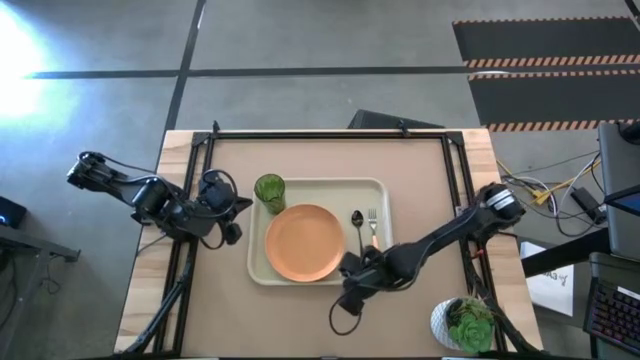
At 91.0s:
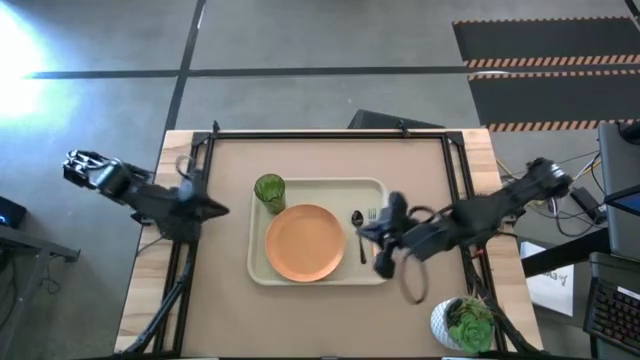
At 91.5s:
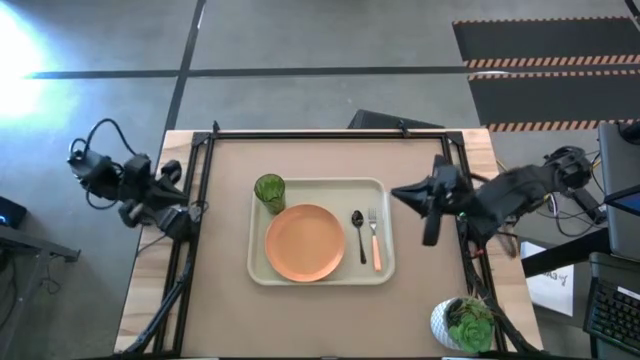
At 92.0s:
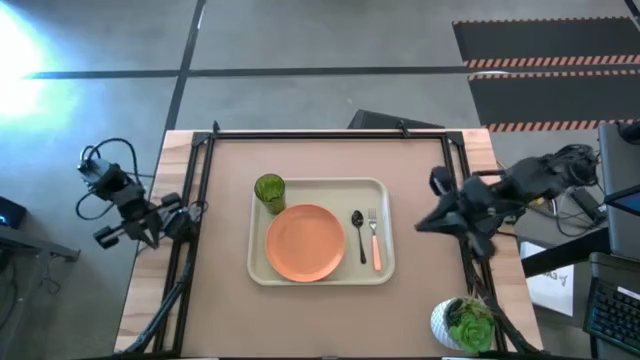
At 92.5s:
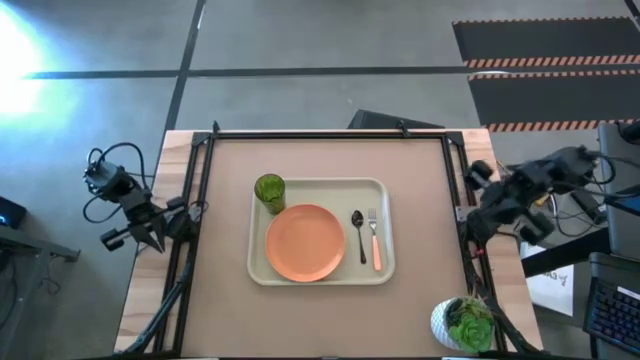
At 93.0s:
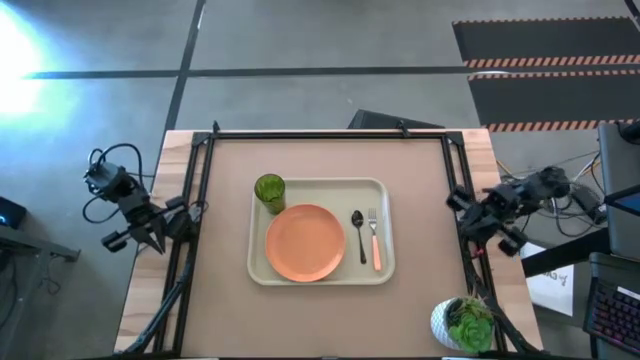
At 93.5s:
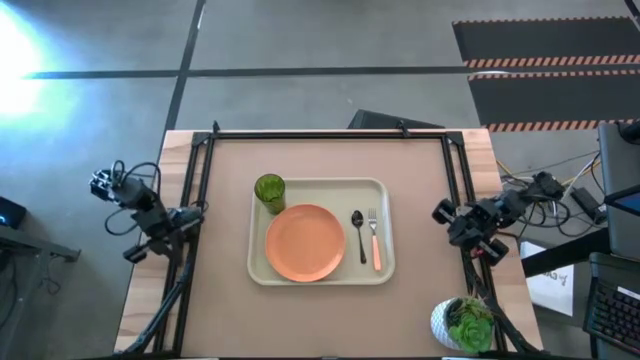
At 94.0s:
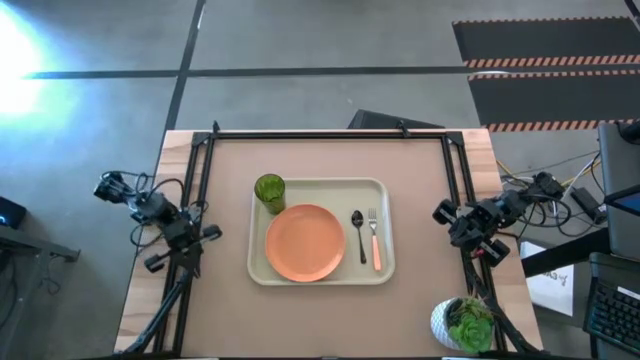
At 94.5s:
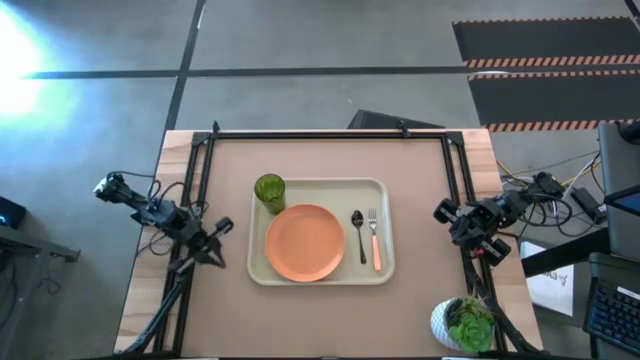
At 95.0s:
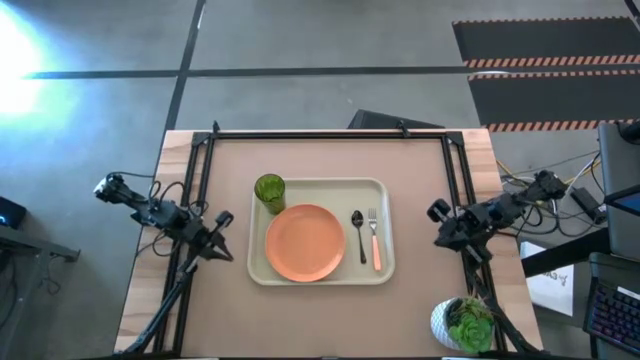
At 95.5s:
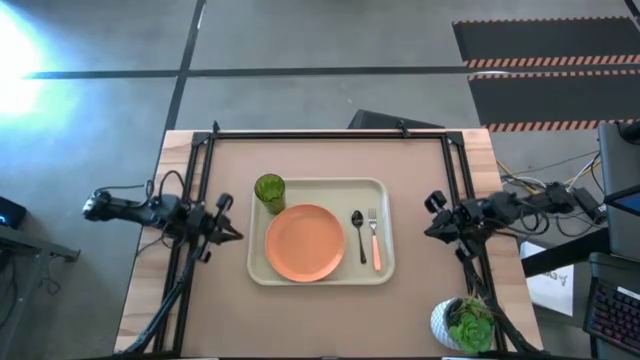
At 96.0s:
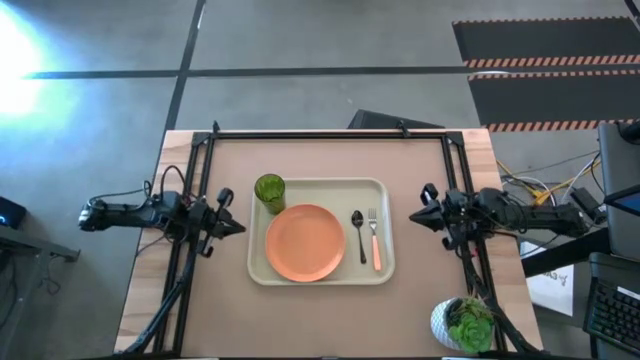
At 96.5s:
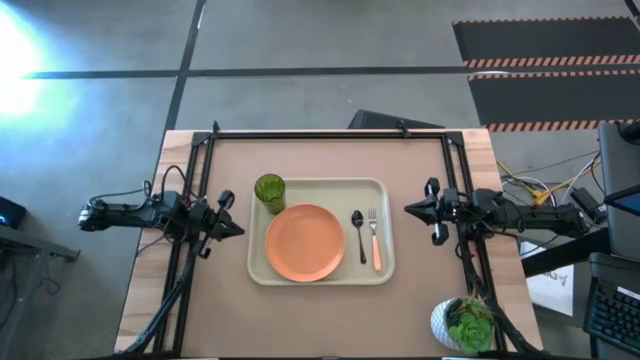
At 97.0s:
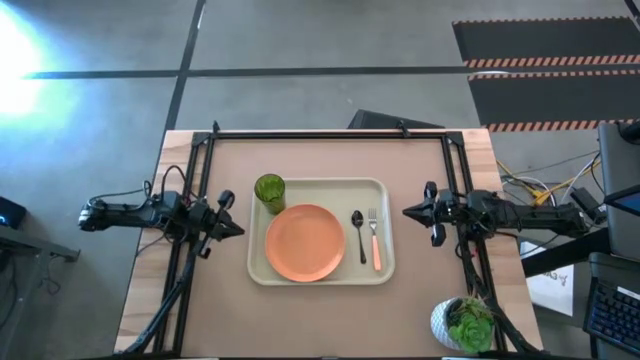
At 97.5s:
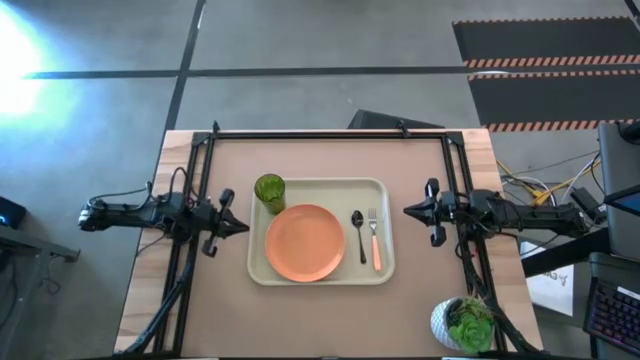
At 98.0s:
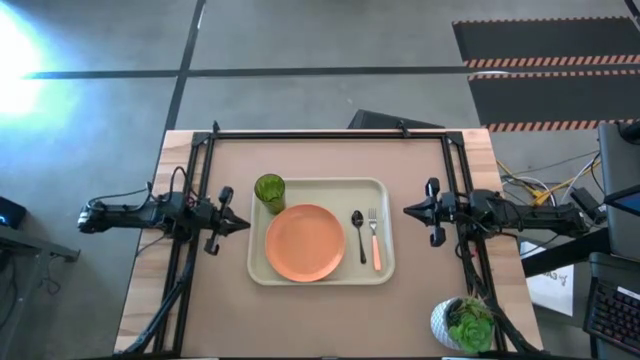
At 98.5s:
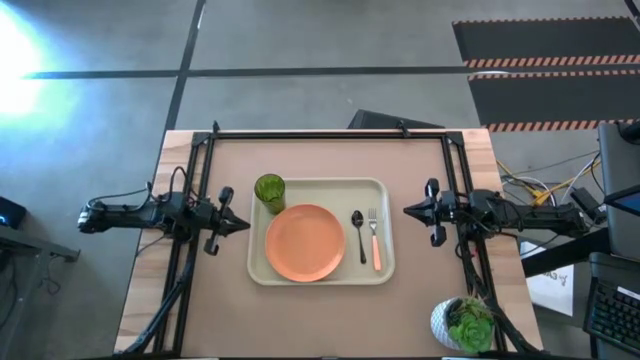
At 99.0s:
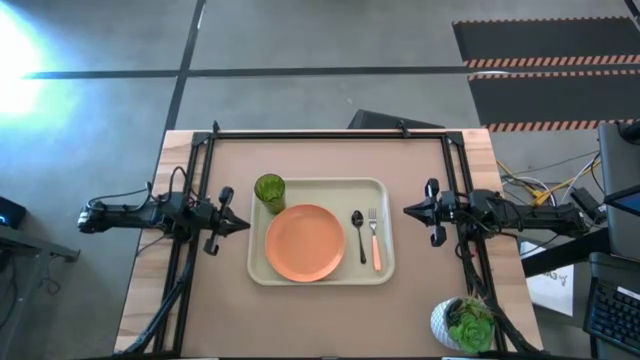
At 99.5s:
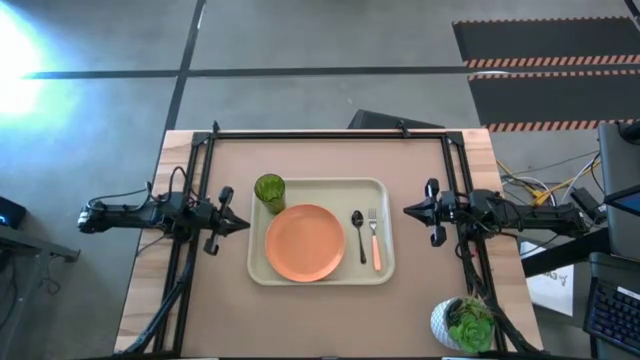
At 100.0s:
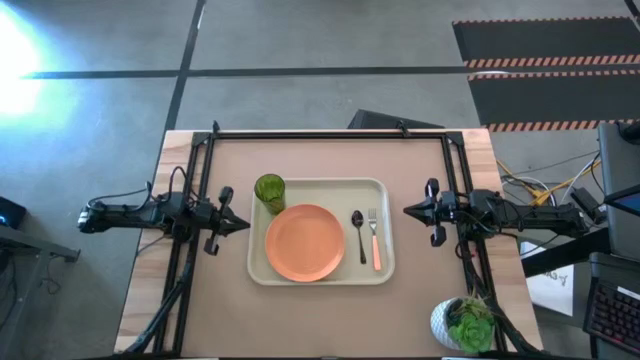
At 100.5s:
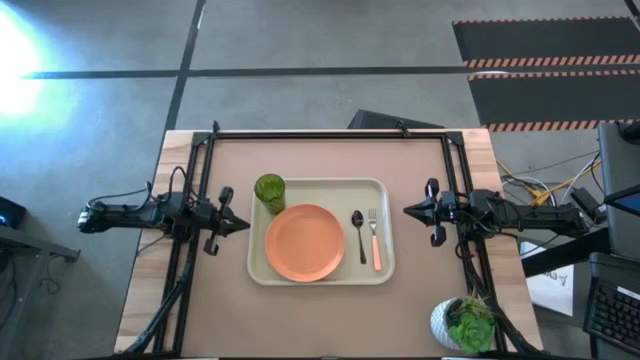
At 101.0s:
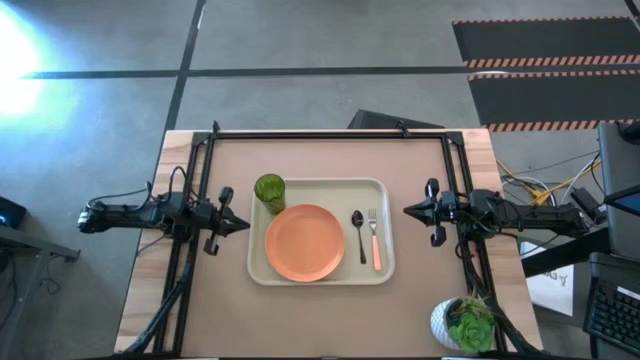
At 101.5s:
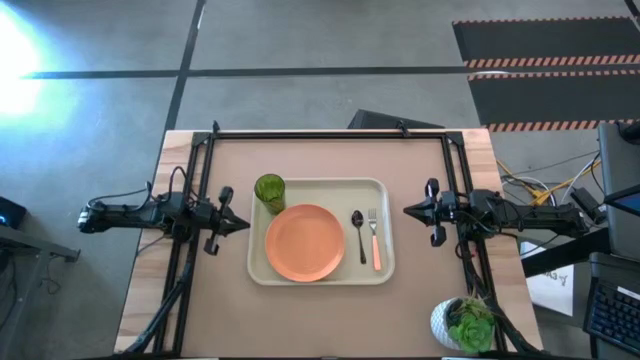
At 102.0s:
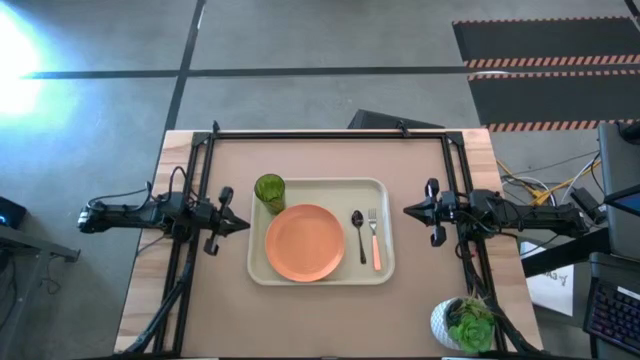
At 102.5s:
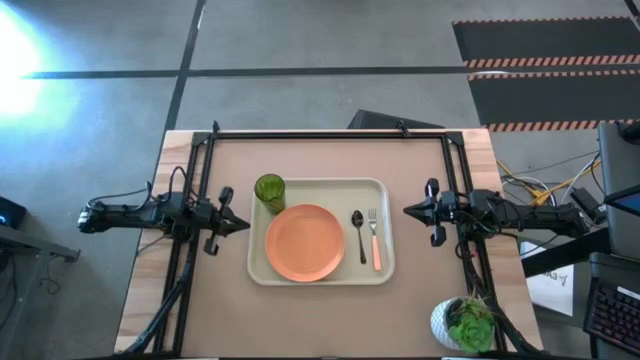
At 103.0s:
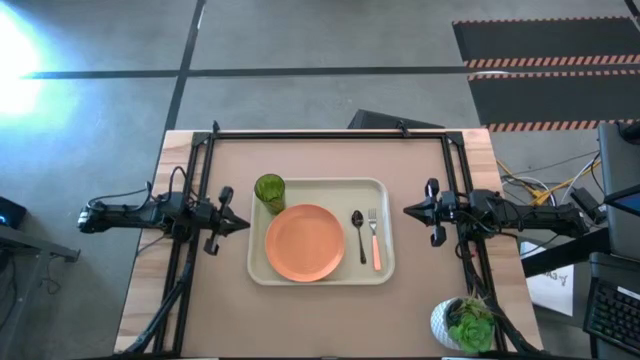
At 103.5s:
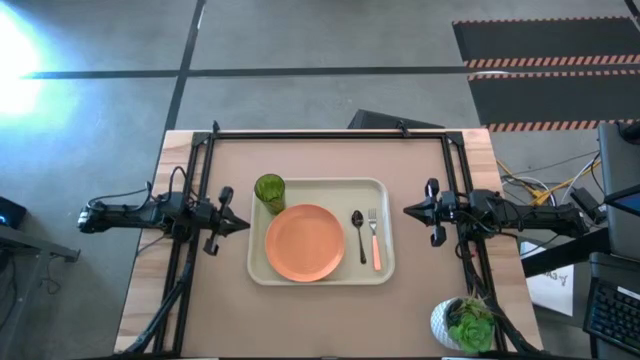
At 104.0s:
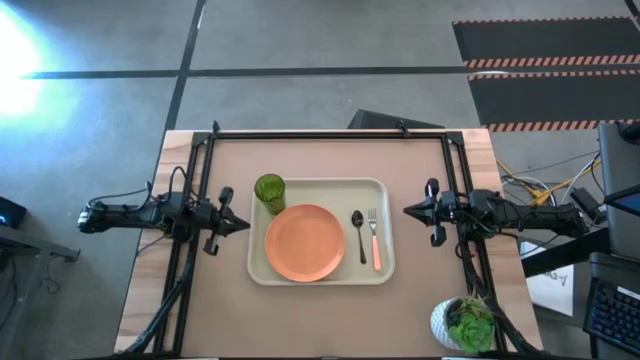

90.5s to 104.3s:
Task: Pick and place plate/cup/fork/spoon on tray
Return to Home Position

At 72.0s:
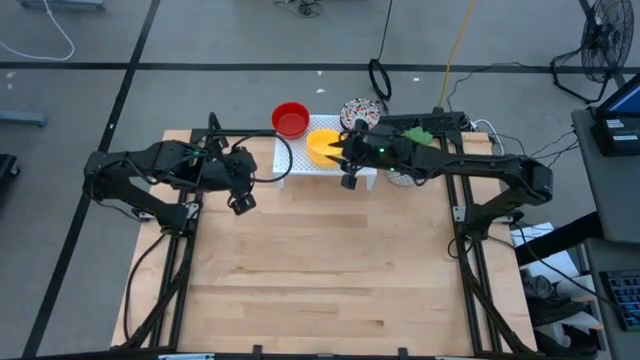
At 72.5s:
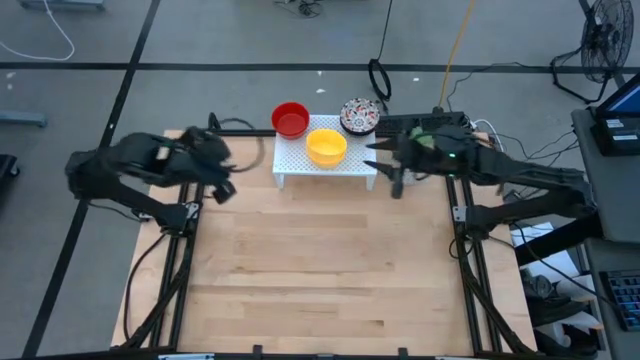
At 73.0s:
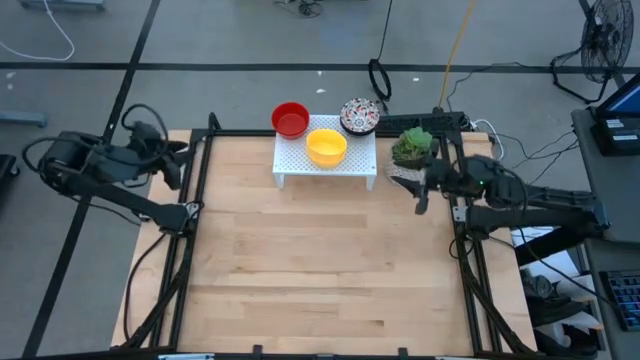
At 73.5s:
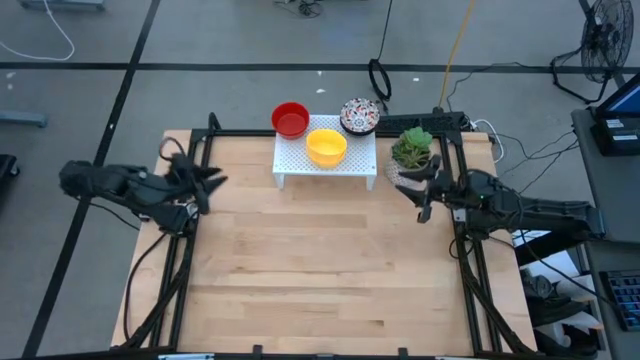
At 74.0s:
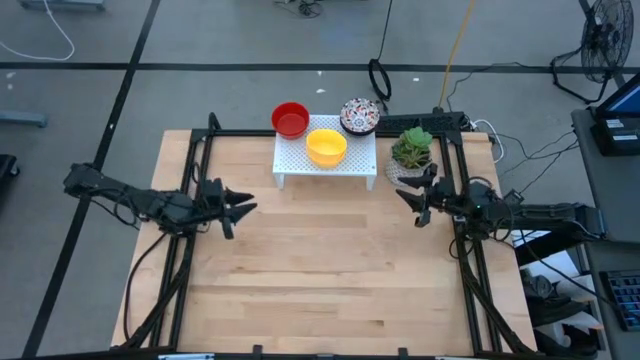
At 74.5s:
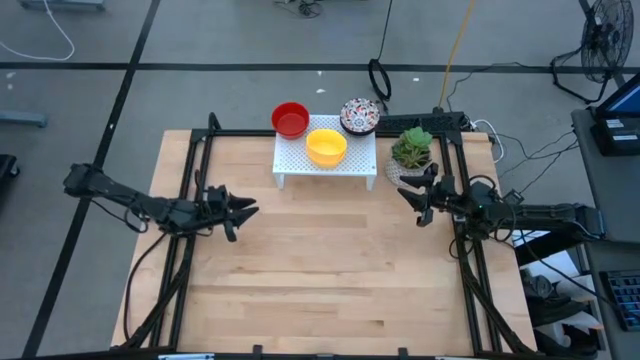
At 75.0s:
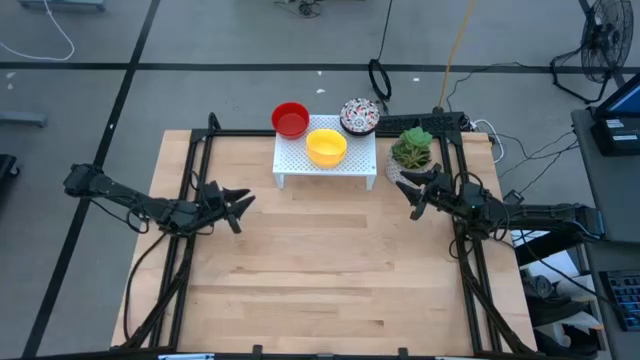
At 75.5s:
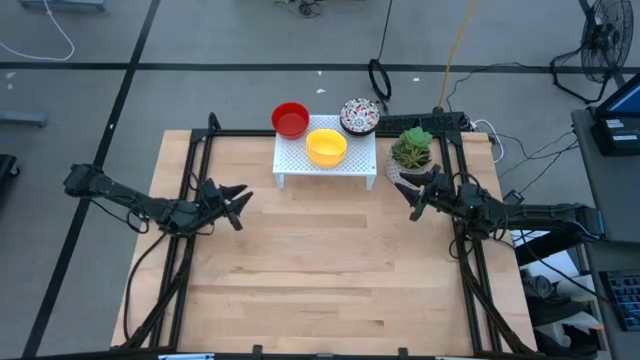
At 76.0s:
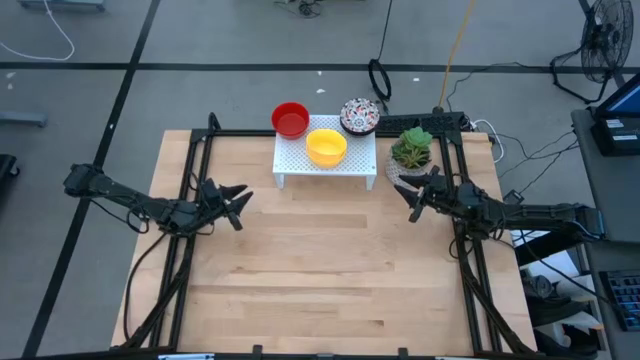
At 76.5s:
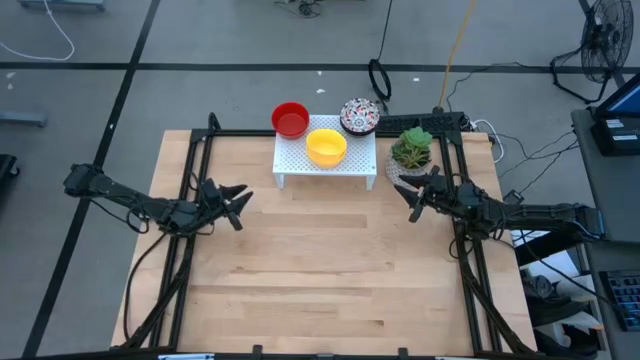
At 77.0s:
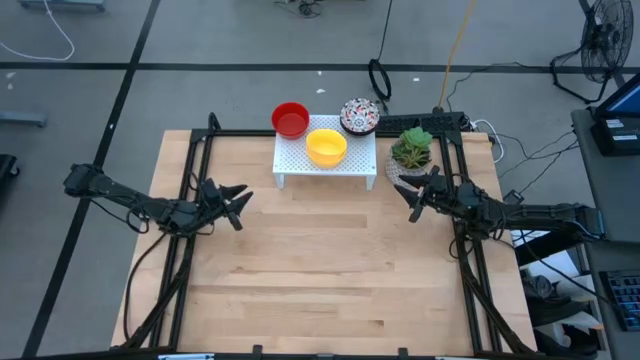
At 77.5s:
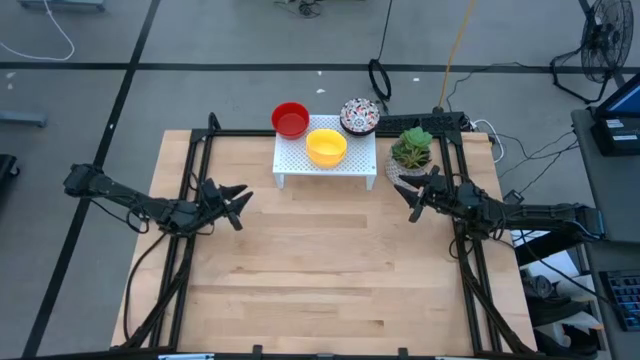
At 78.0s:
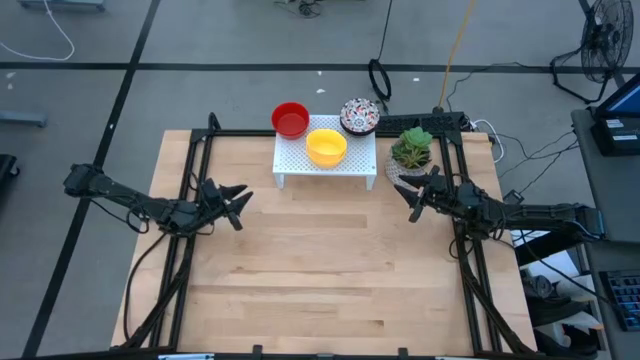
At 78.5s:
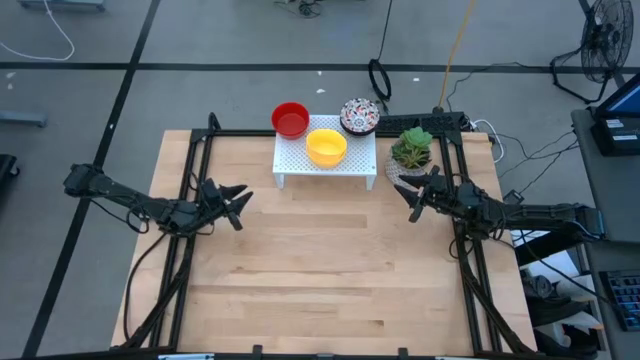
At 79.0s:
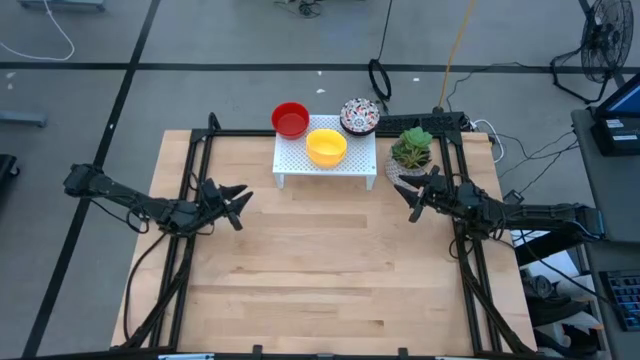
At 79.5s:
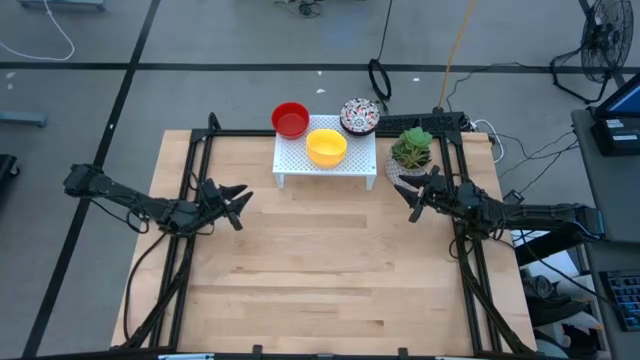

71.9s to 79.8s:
Task: Pick & Place Mini bowls
Return to Home Position
